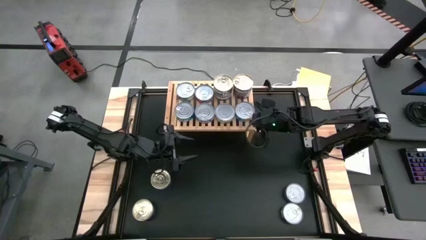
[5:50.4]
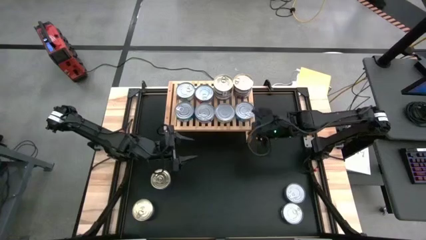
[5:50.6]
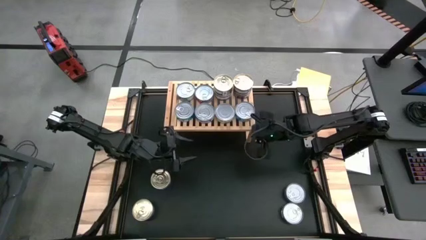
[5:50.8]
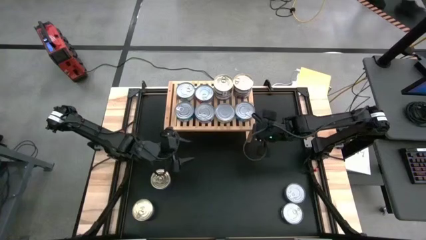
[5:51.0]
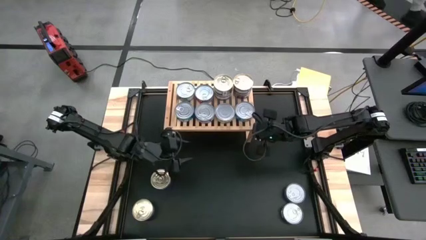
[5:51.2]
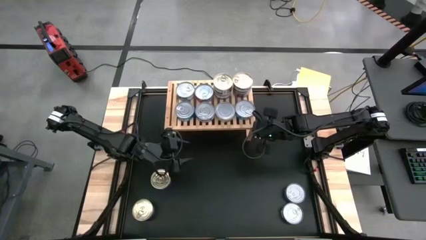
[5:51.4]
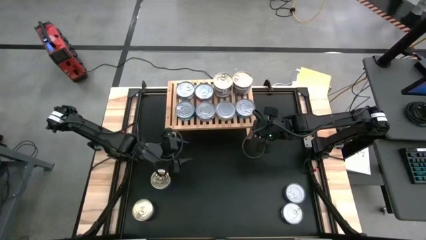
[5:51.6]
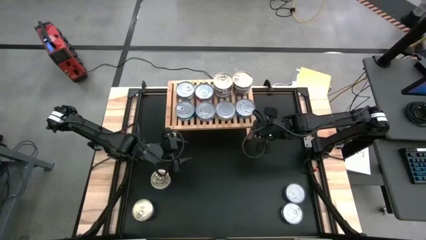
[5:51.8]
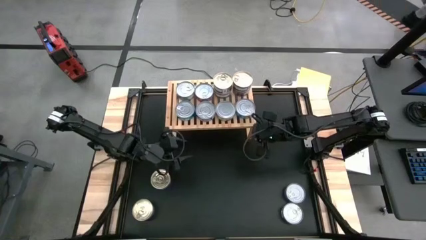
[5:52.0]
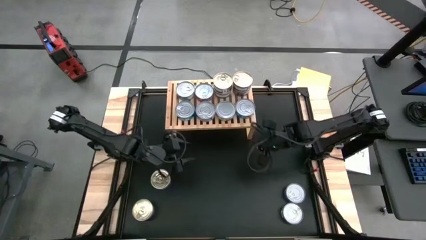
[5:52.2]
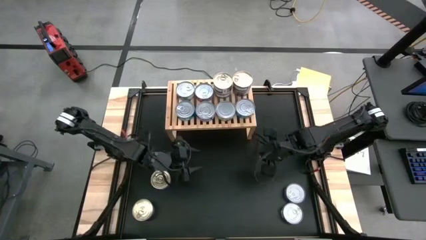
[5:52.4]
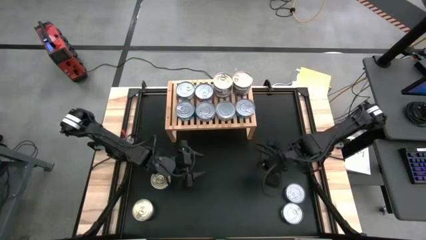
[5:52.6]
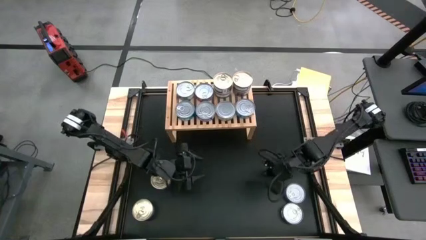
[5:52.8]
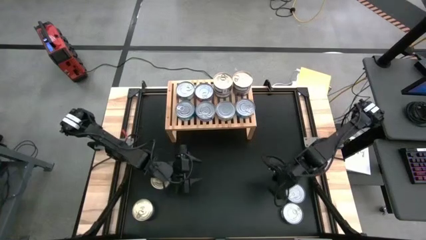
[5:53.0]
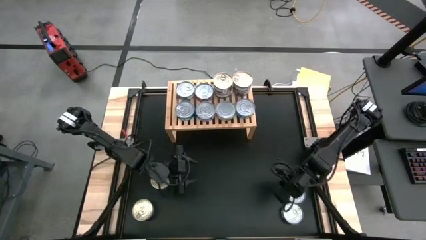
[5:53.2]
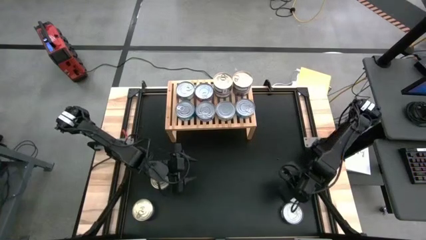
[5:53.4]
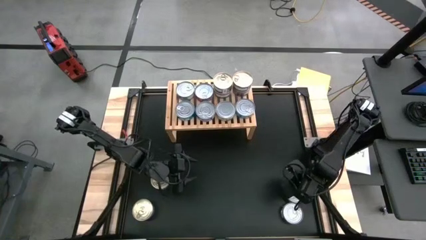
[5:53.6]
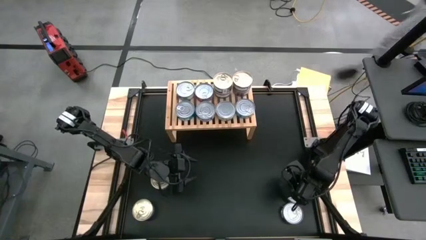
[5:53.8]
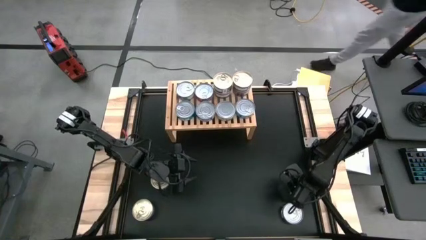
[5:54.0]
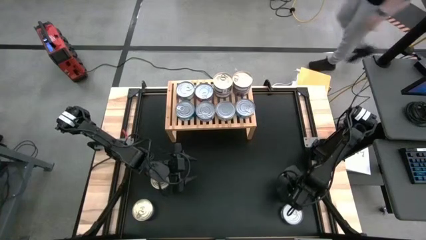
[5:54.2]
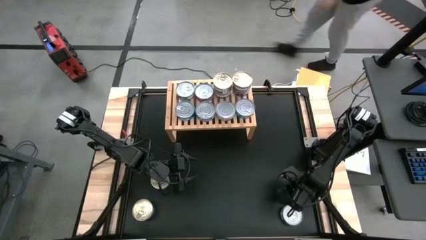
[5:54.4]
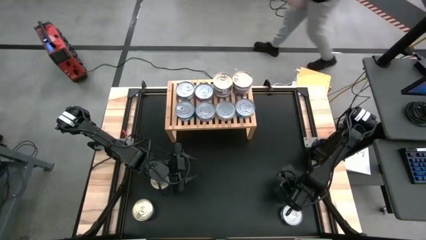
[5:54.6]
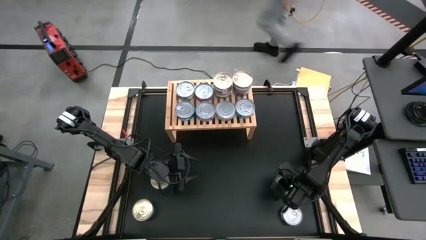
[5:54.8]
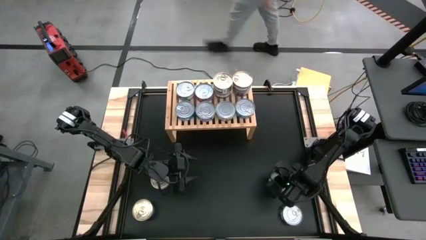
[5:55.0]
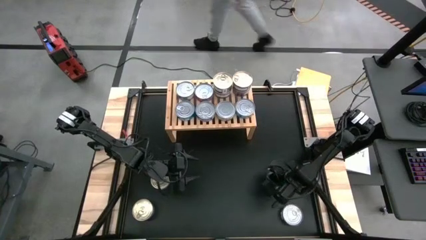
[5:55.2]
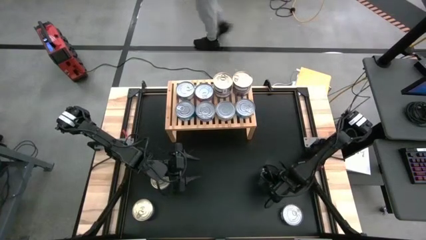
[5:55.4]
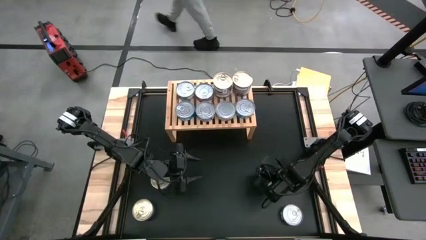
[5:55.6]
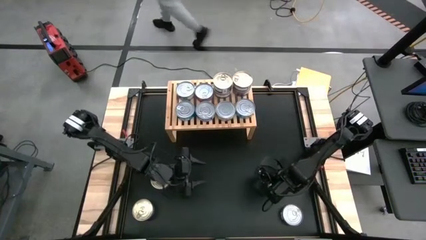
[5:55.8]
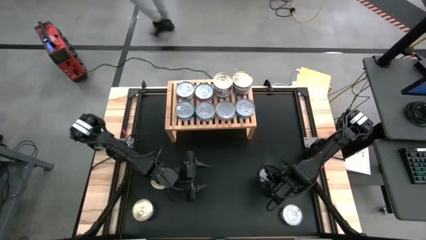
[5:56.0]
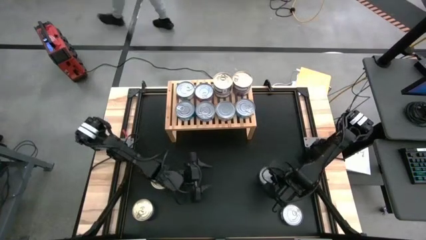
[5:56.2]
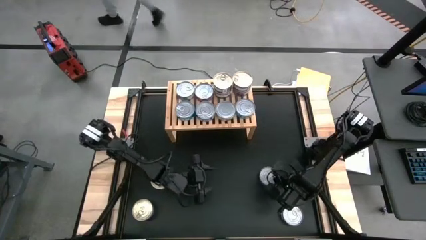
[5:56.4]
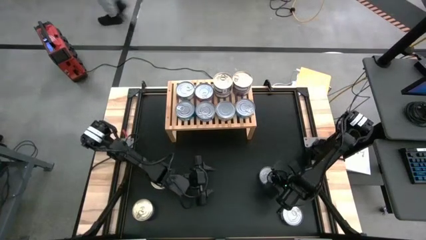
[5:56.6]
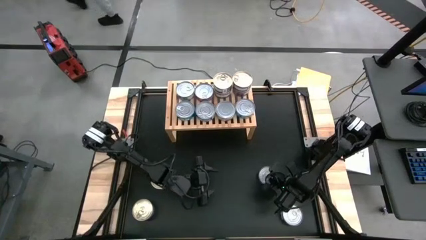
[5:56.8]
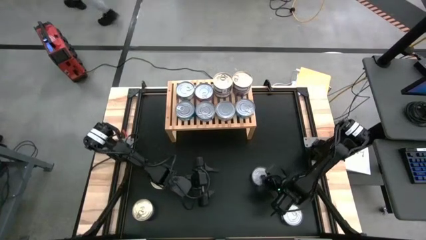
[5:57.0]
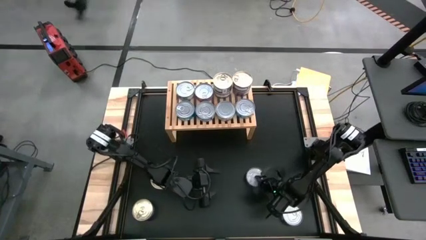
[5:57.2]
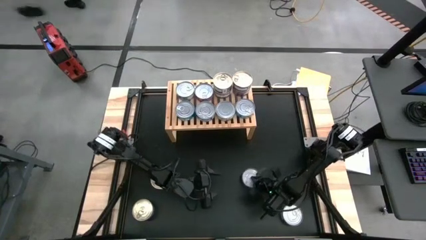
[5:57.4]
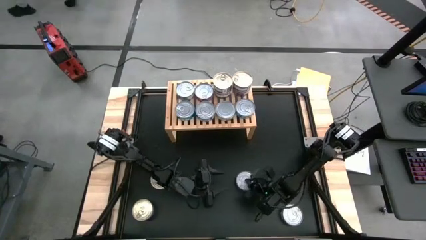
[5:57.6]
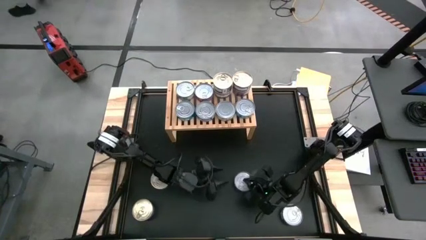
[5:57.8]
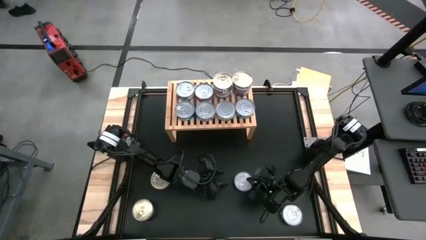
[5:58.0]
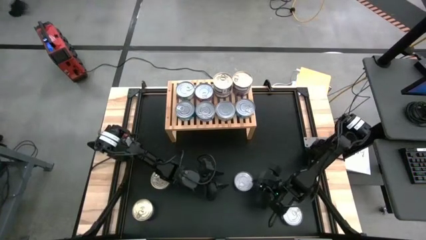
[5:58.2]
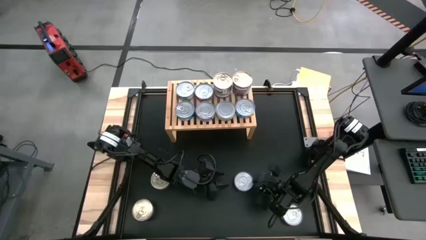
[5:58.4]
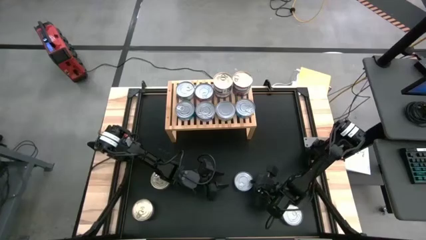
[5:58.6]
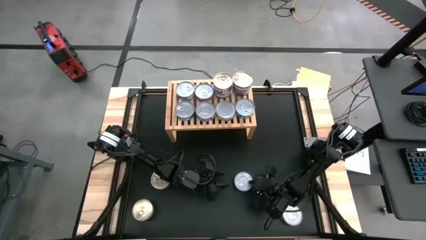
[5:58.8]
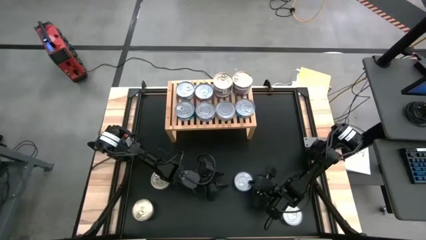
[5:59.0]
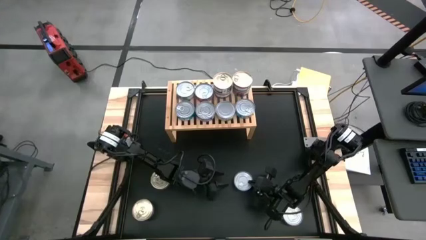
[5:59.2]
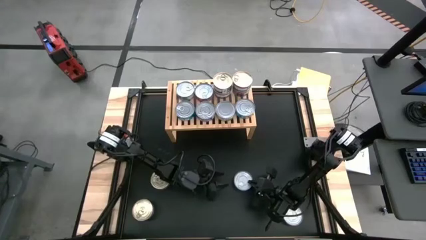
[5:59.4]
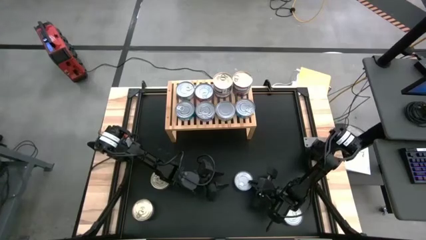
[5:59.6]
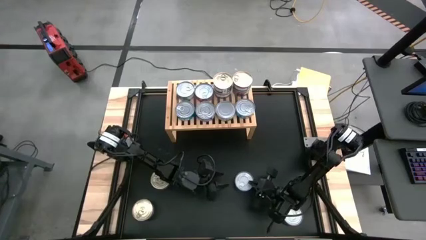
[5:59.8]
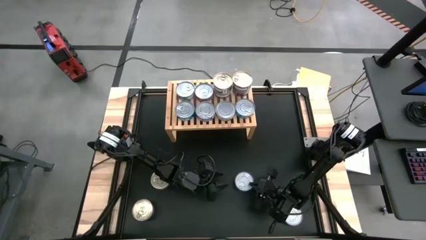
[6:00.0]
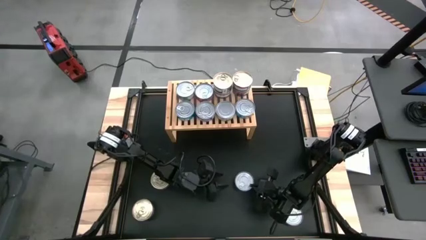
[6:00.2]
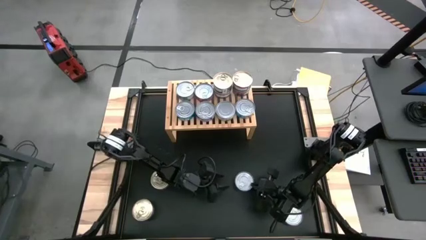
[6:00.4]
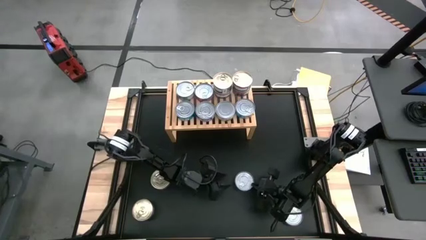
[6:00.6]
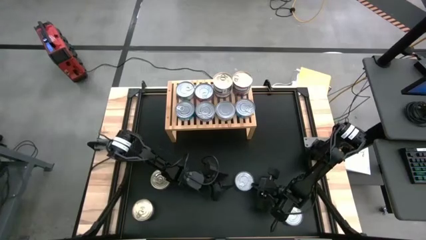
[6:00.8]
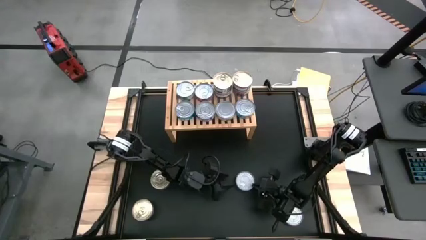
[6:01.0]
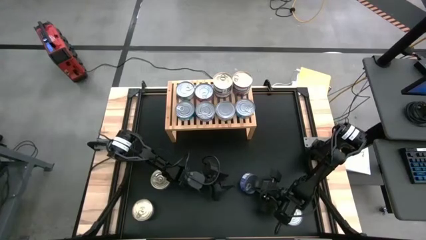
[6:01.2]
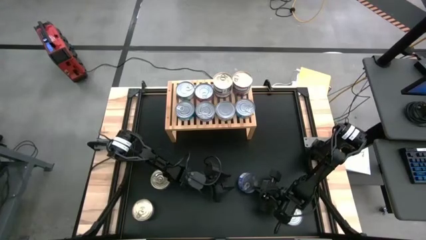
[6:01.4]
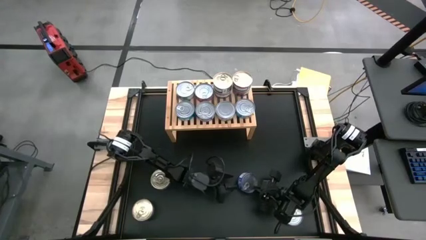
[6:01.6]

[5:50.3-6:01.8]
Task: Stack canned seafood by type on shelf
Stack the blue tuna can on top of the blue tuna can

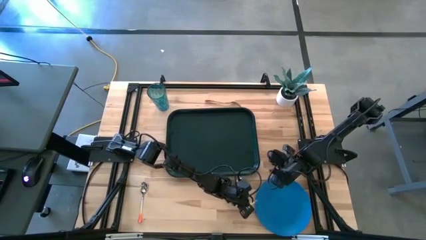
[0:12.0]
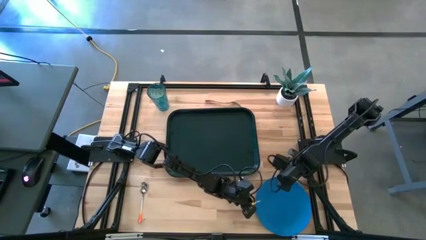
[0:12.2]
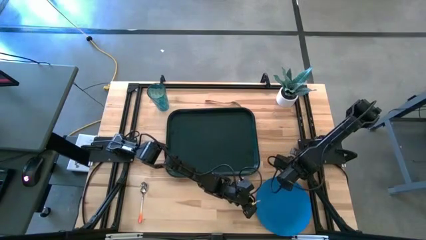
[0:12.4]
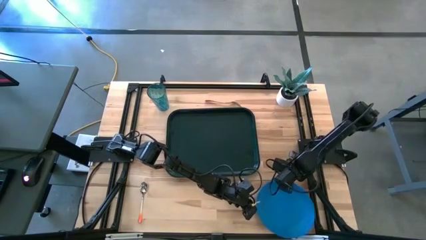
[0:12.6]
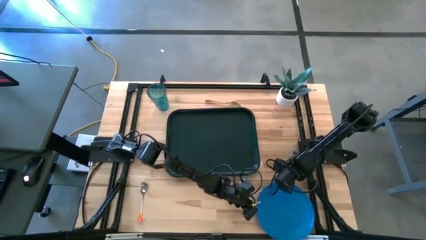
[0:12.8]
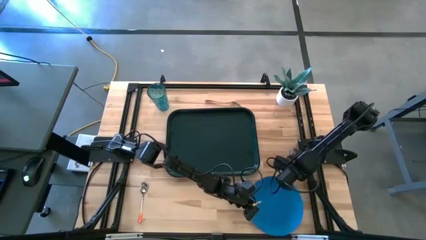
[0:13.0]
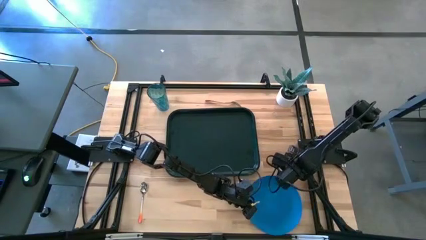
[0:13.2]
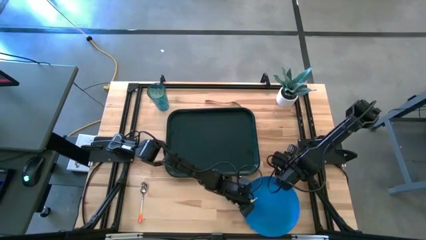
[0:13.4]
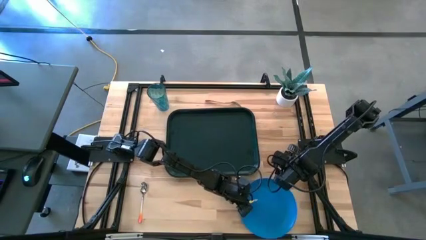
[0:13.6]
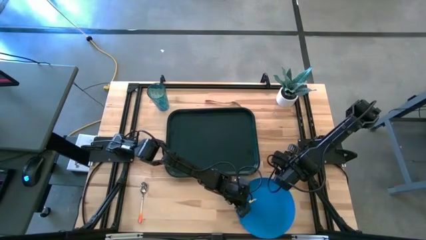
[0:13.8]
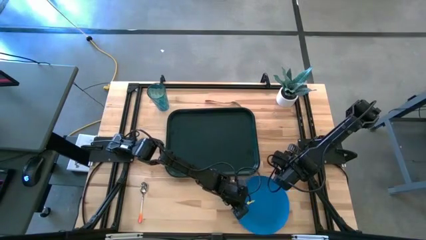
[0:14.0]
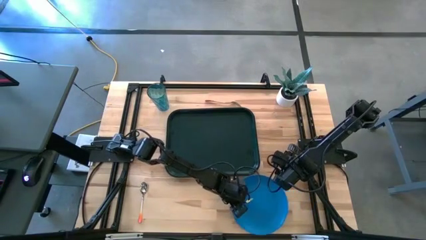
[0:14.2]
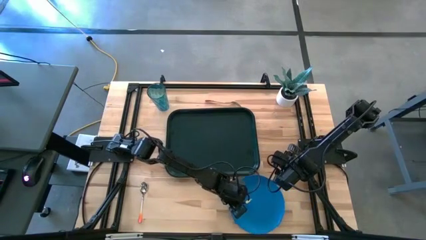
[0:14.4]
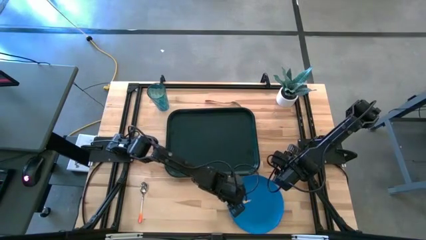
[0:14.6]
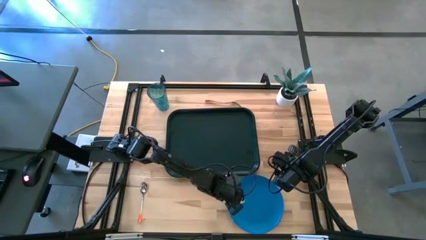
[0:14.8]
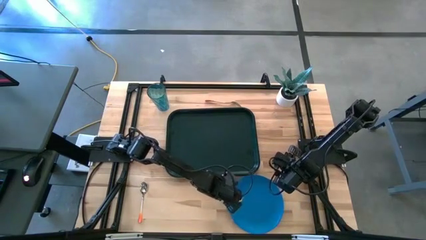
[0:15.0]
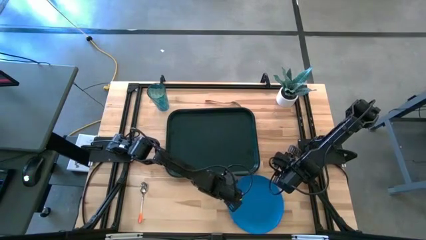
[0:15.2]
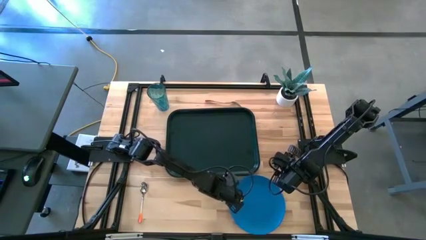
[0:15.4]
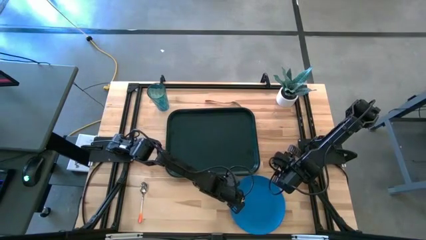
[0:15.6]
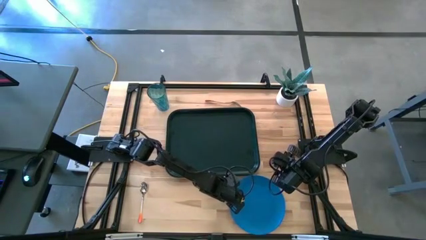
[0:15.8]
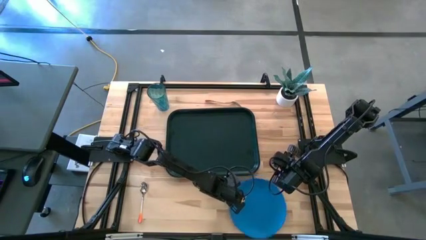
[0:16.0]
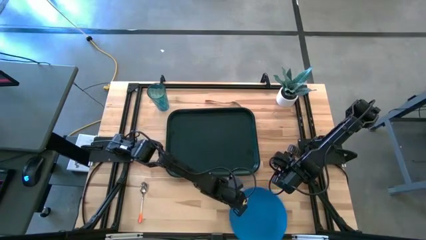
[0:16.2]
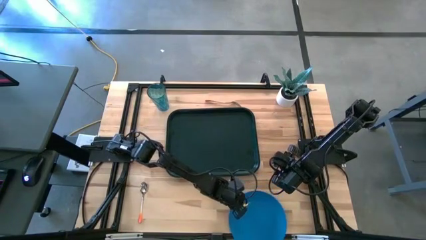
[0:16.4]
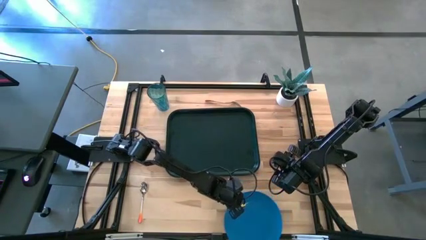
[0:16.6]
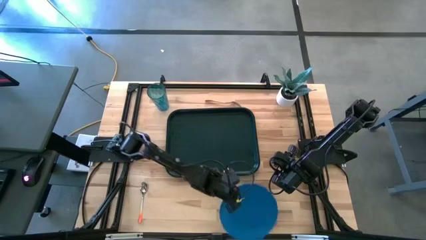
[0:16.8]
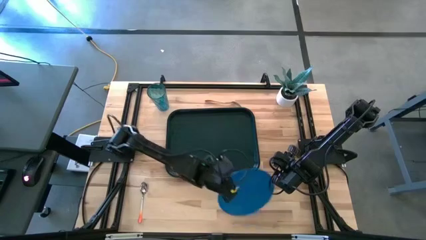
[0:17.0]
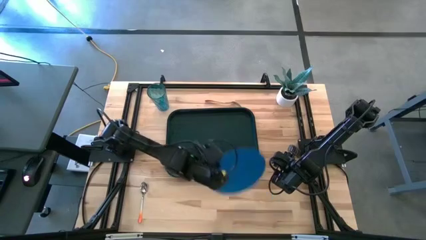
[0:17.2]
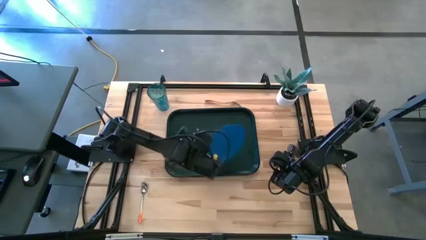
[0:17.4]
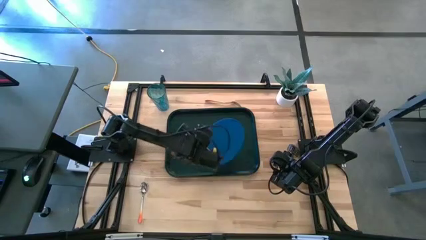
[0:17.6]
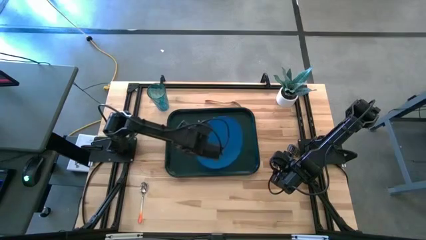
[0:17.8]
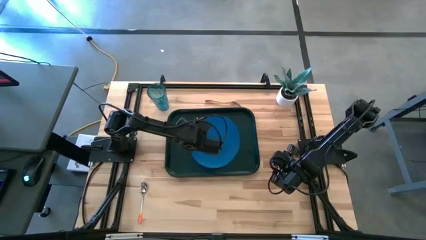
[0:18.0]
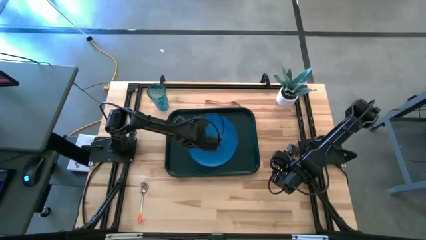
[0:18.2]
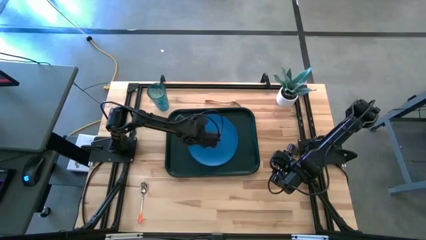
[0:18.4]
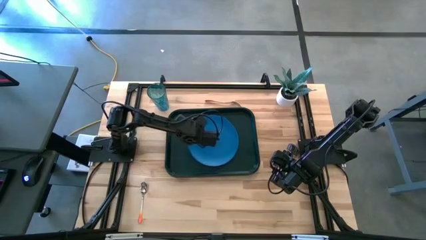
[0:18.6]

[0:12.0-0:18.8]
Task: Pick and place plate/cup/fork/spoon on tray
Put the blue plate on the serving tray
